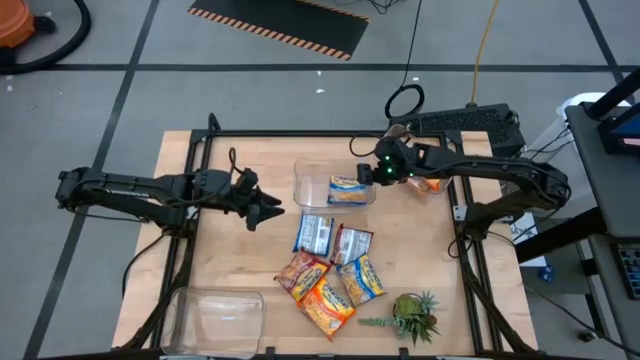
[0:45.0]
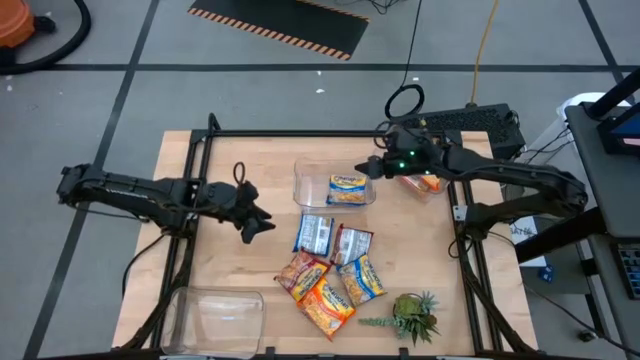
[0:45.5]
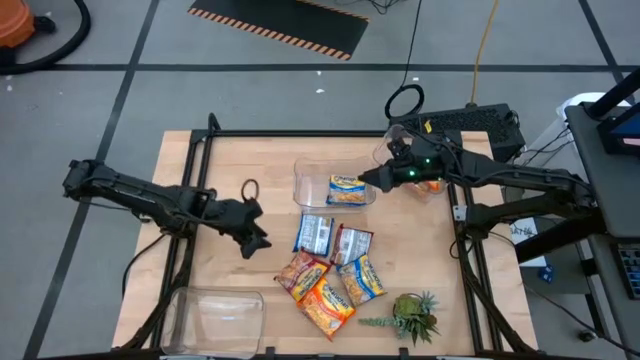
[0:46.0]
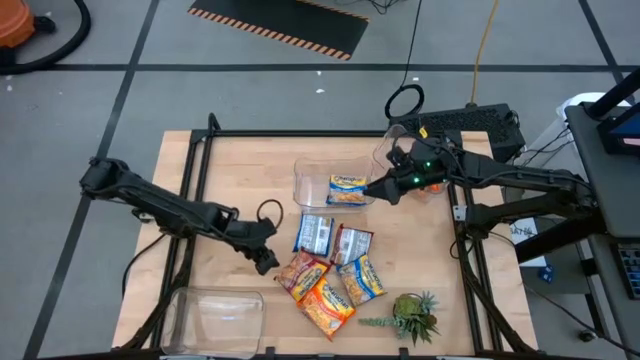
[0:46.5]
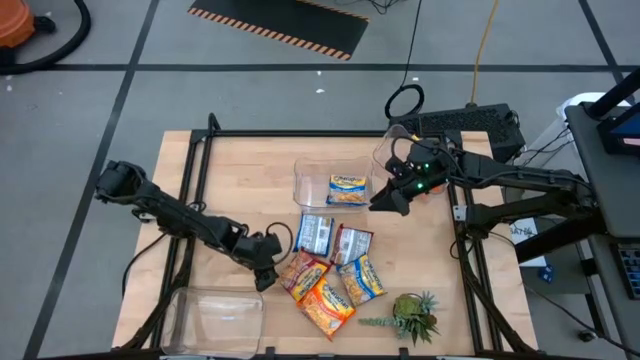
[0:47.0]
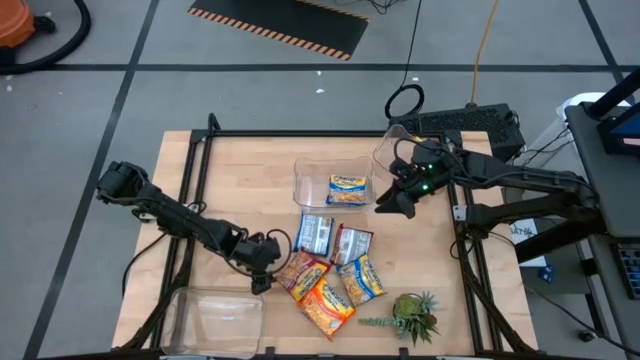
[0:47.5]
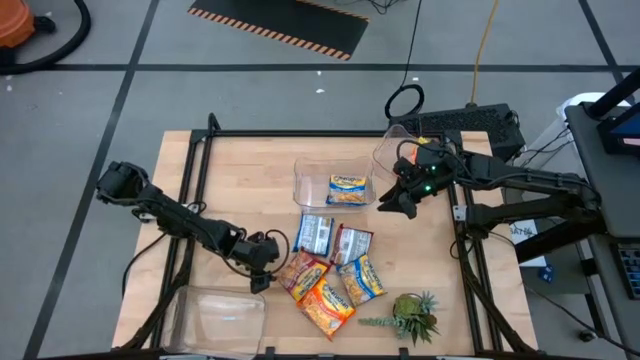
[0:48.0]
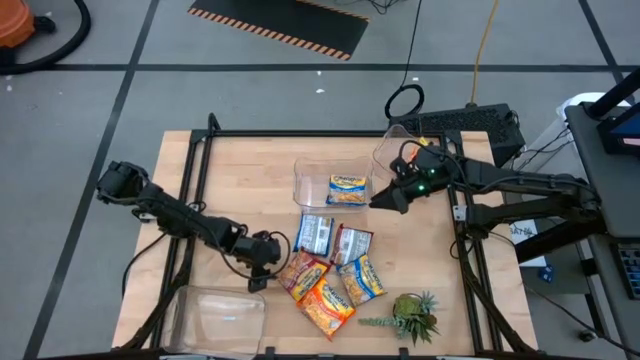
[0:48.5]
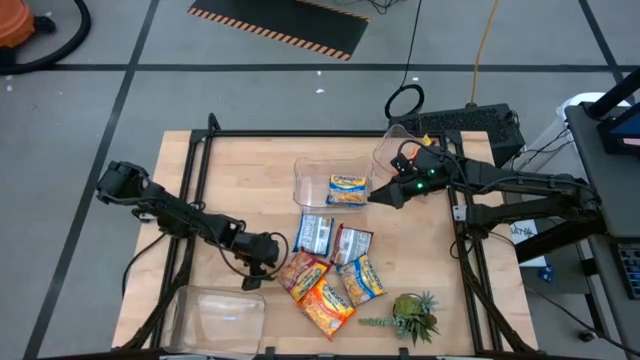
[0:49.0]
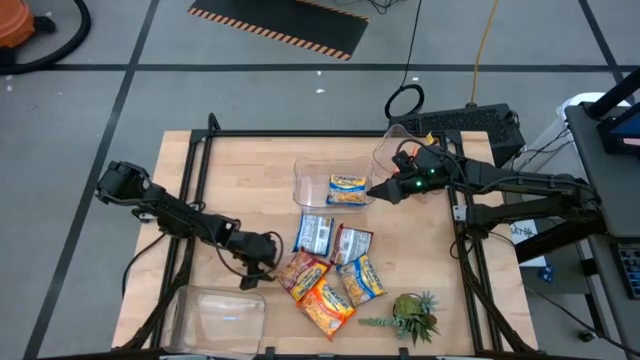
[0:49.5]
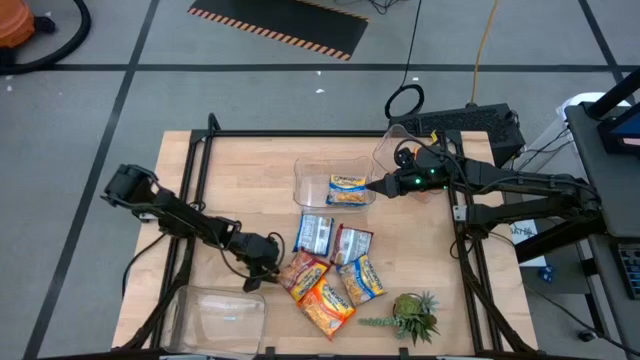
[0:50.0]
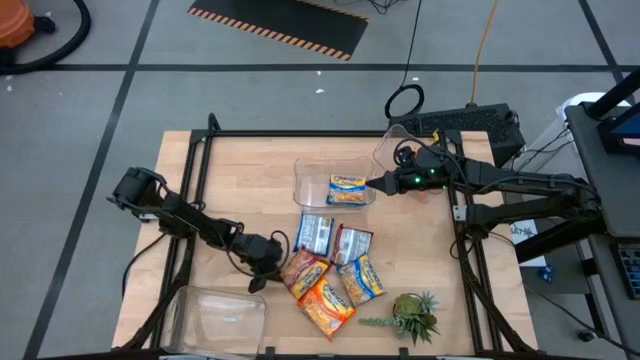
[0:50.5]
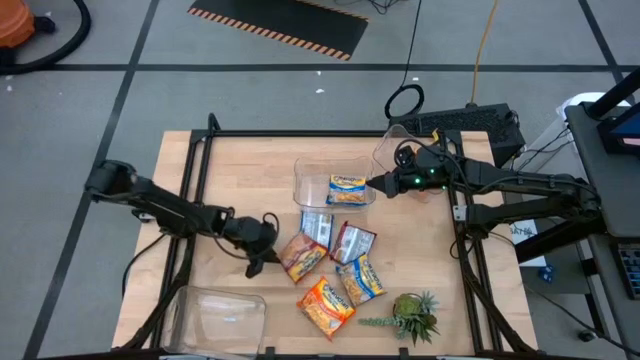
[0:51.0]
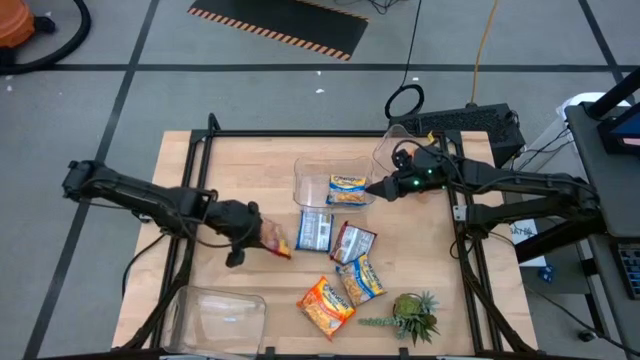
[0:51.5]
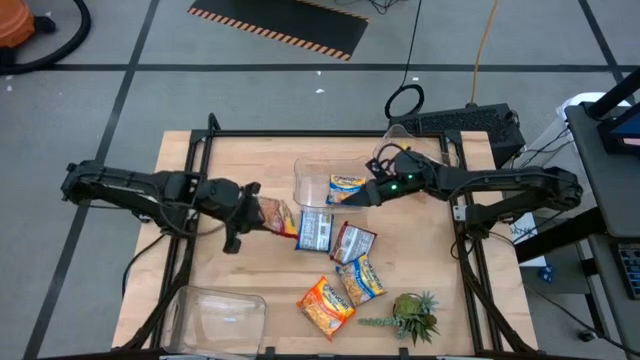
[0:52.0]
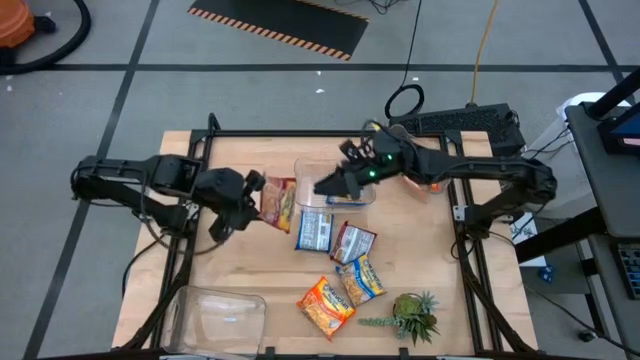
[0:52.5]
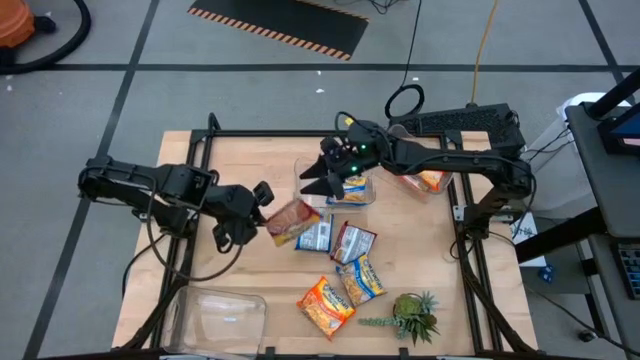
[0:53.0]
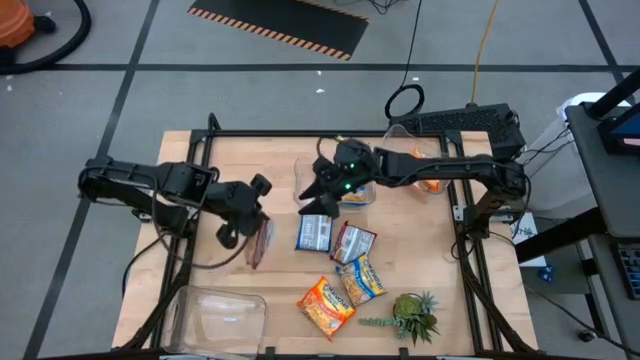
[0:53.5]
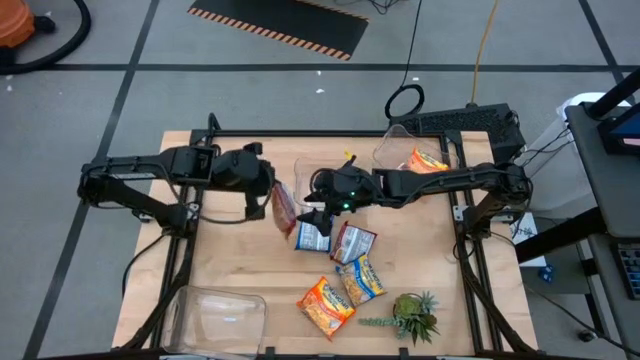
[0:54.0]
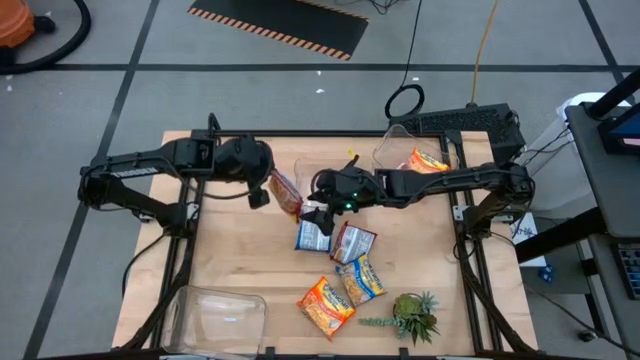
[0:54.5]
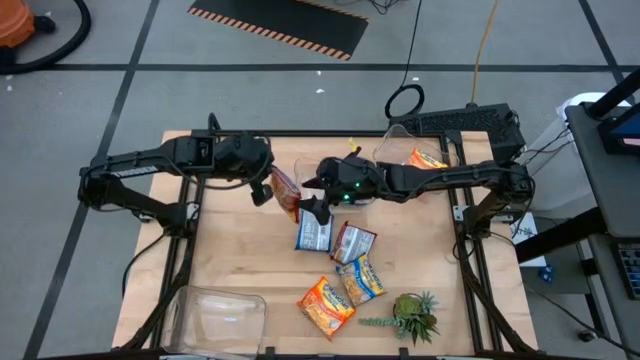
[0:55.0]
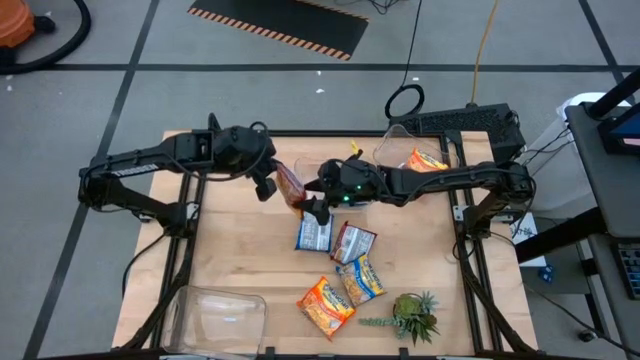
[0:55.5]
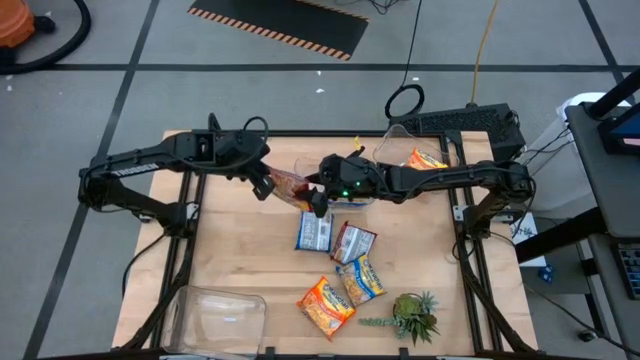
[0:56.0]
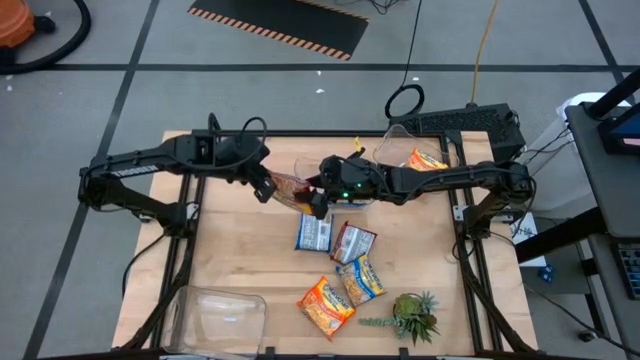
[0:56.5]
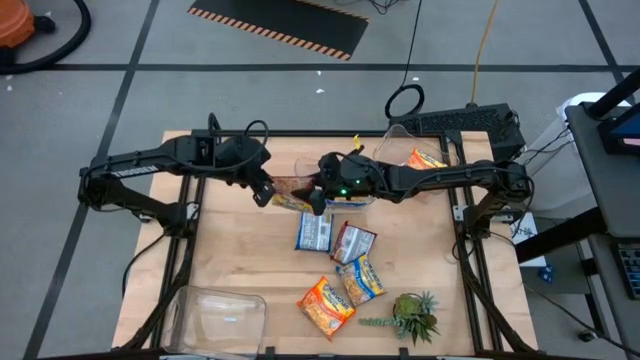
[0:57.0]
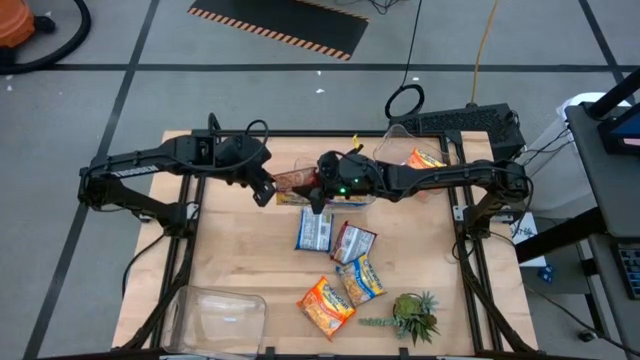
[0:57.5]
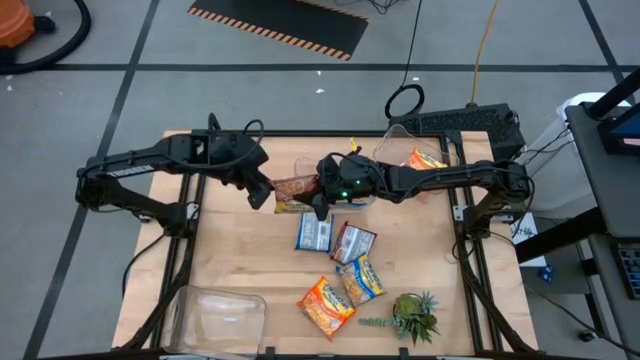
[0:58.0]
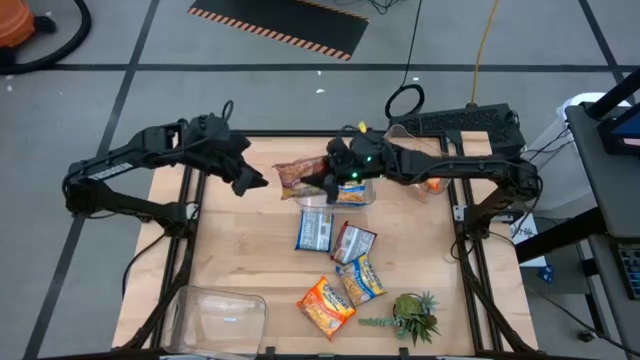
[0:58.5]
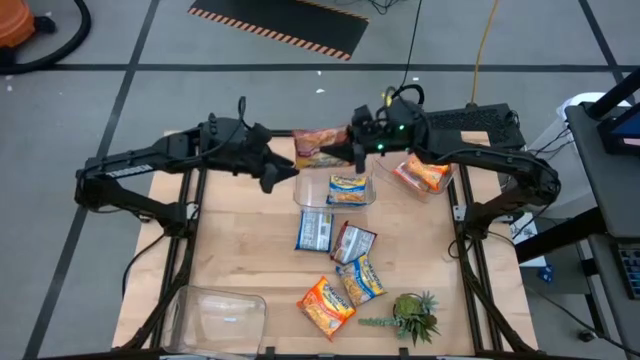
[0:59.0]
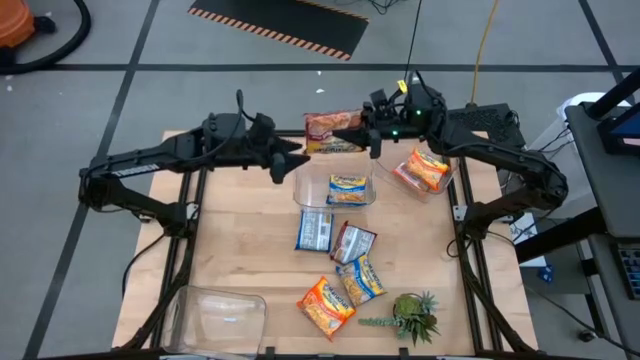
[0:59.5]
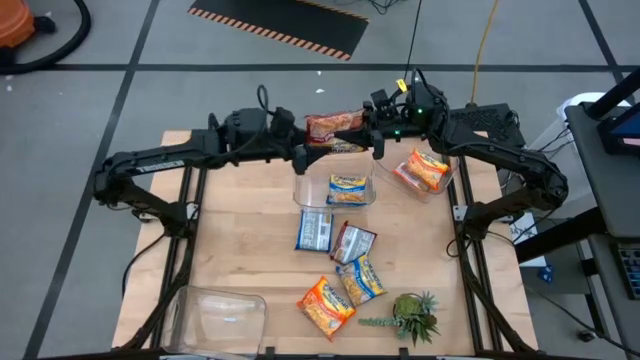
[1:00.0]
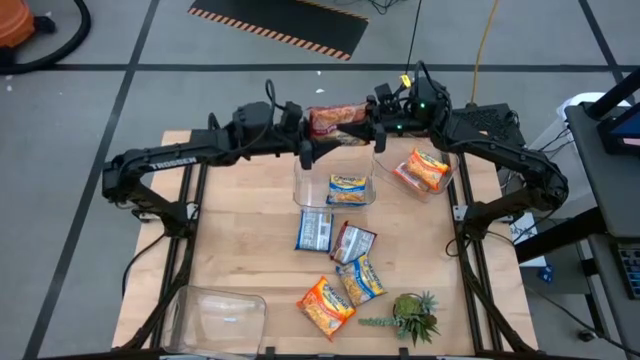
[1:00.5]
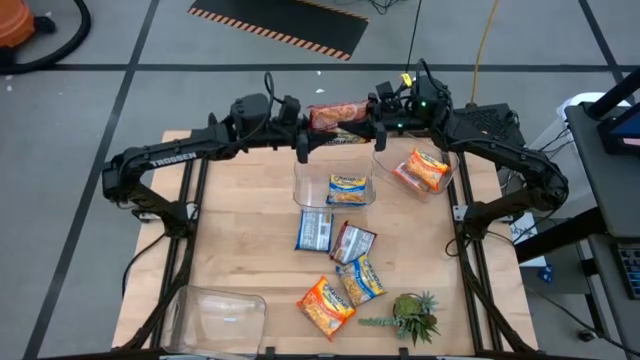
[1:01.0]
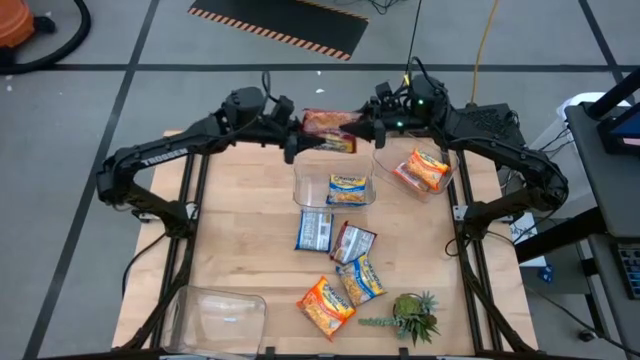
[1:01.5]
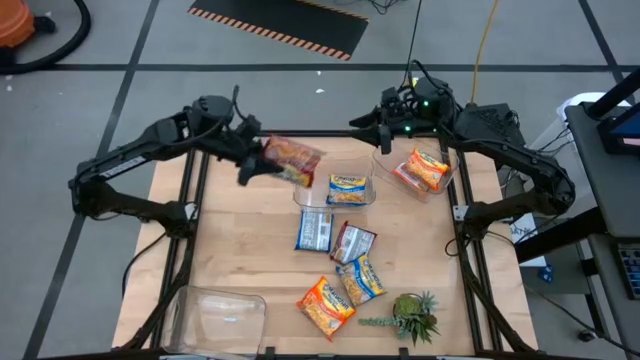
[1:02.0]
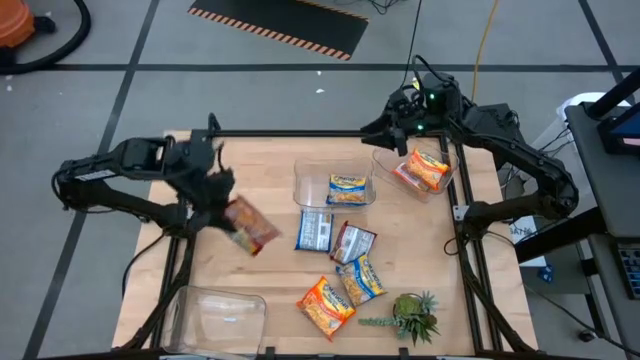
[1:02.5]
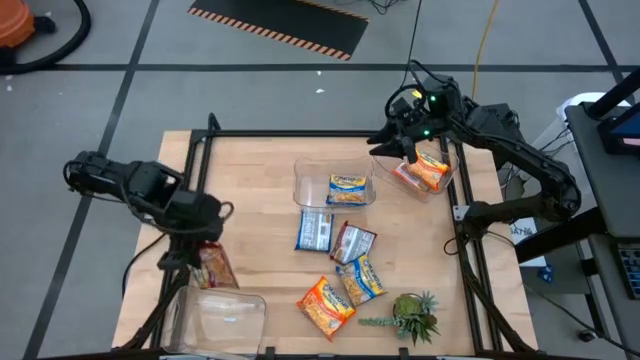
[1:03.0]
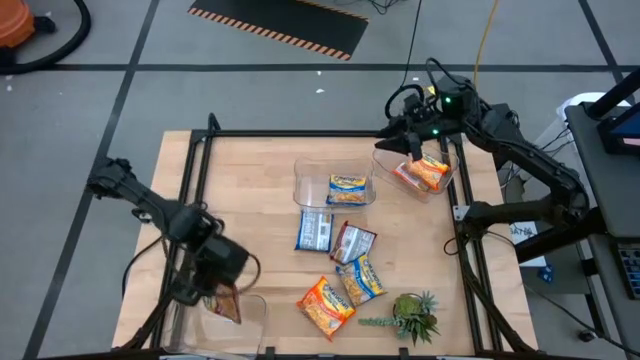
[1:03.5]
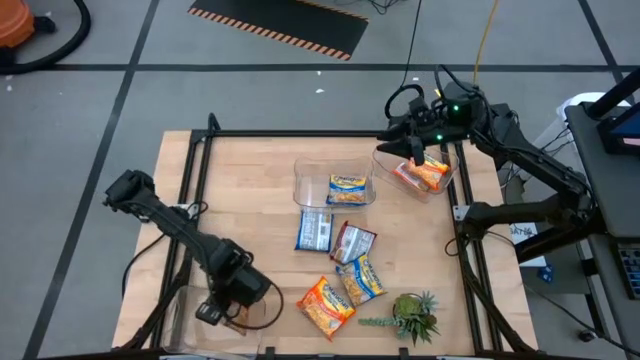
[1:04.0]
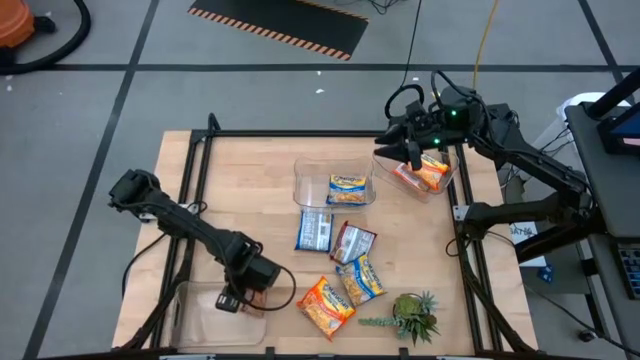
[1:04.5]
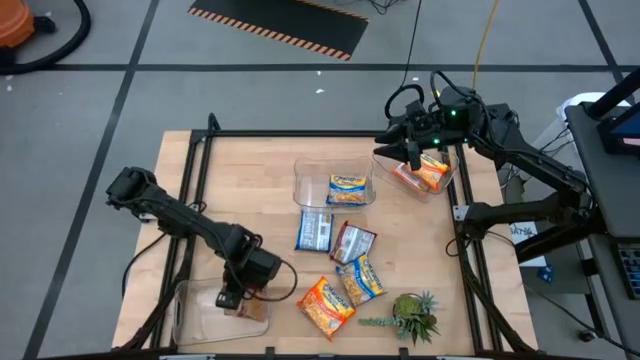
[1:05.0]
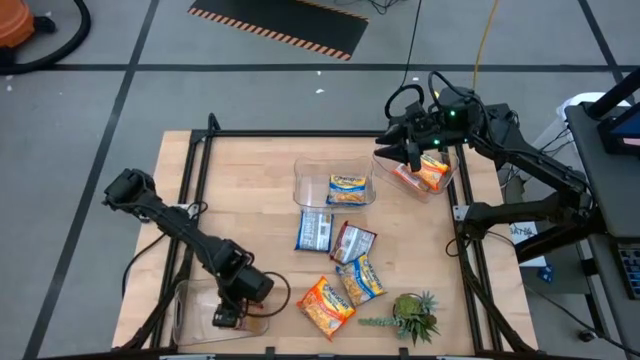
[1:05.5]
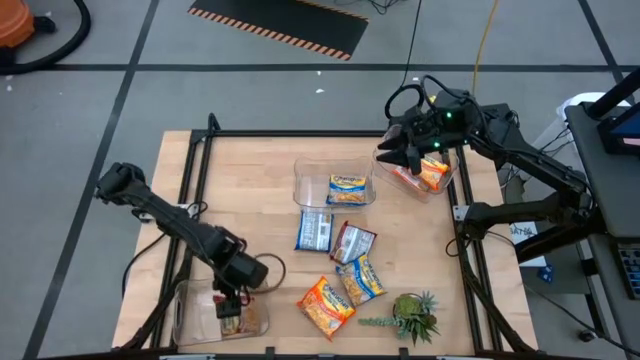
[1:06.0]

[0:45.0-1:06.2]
Task: Sort Maruchan noodles
Put the bottom red noodle pack into the bottom transparent bin

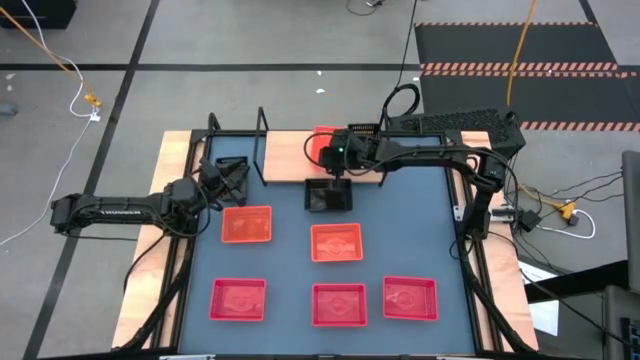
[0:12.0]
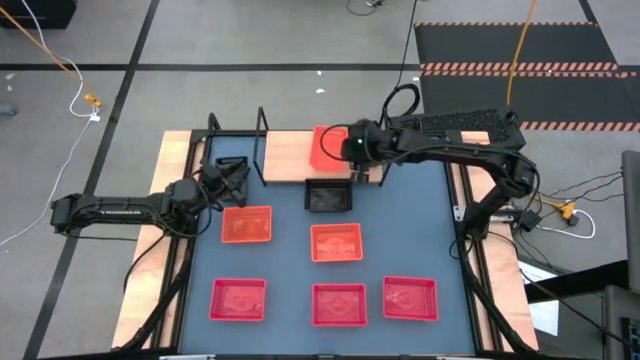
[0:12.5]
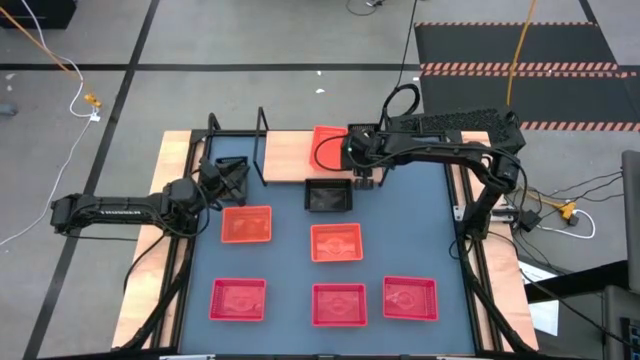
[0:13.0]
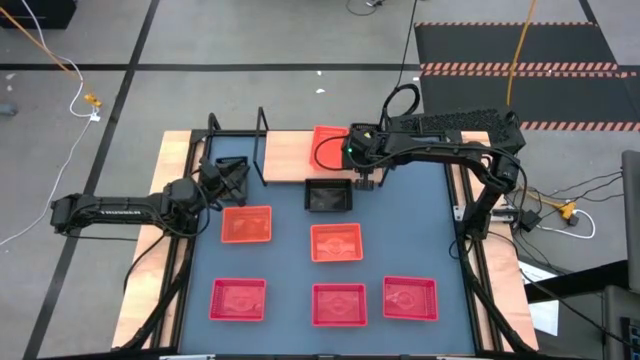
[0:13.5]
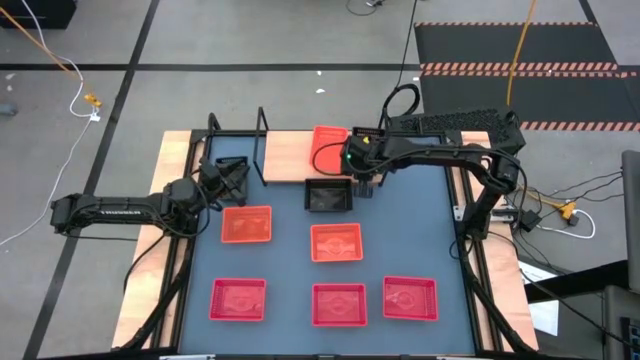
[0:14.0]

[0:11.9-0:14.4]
Task: Stack baskets on shelf by color
Adjust the black bin on the shelf
